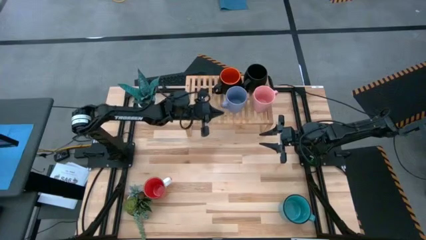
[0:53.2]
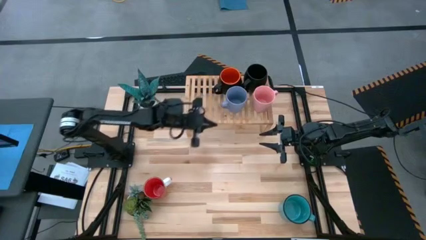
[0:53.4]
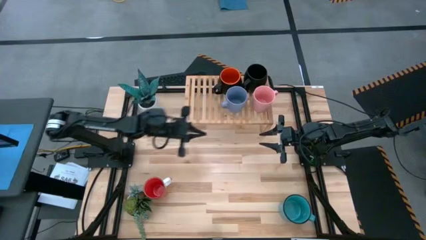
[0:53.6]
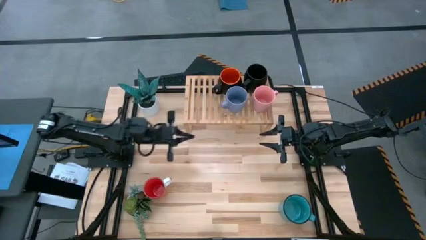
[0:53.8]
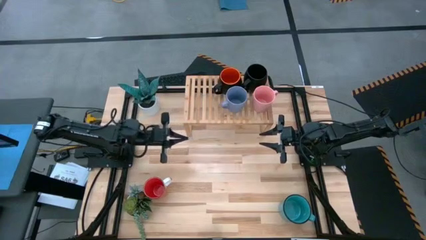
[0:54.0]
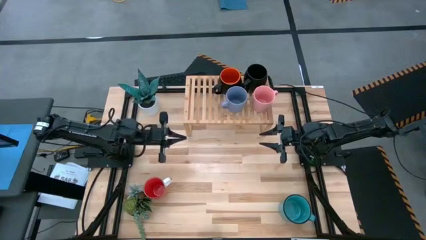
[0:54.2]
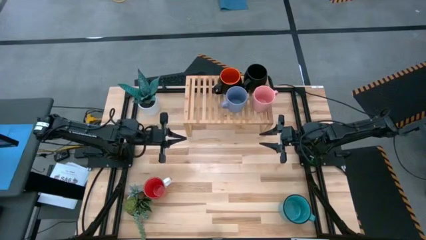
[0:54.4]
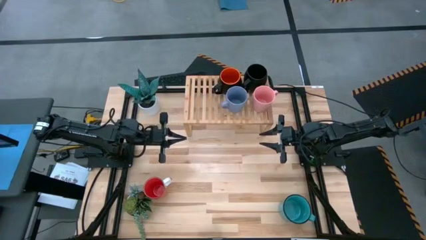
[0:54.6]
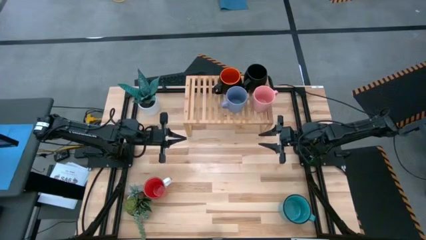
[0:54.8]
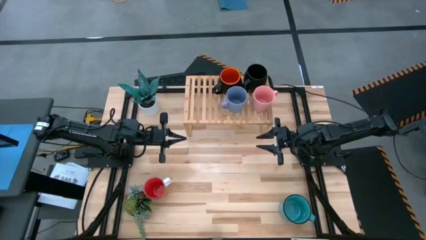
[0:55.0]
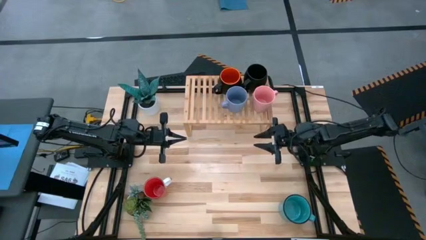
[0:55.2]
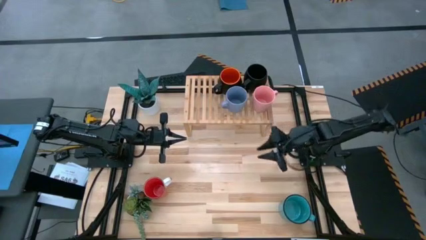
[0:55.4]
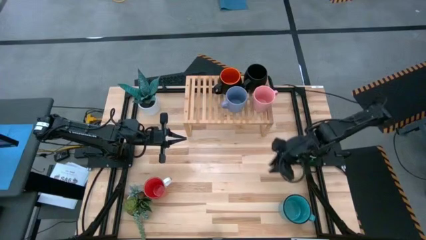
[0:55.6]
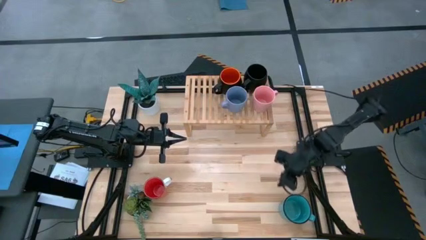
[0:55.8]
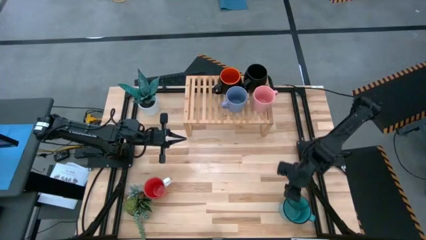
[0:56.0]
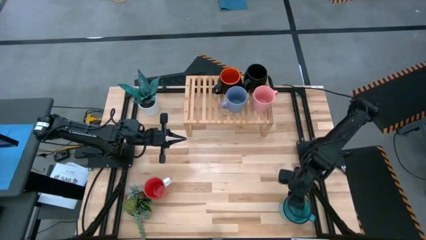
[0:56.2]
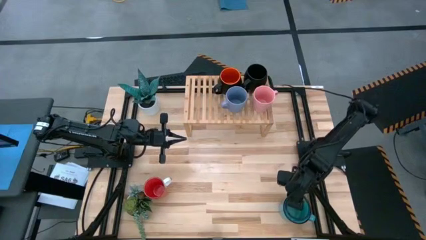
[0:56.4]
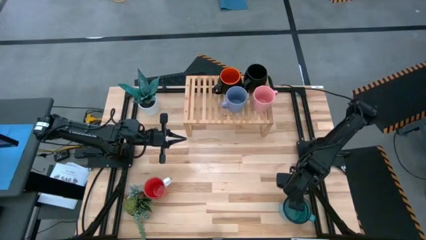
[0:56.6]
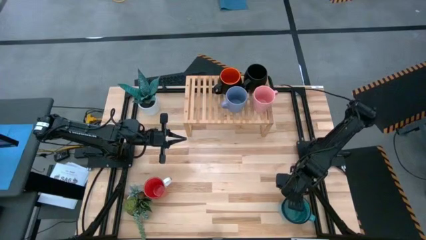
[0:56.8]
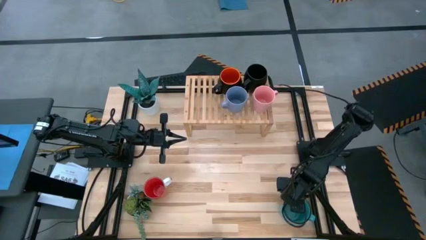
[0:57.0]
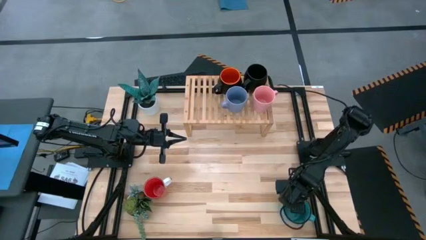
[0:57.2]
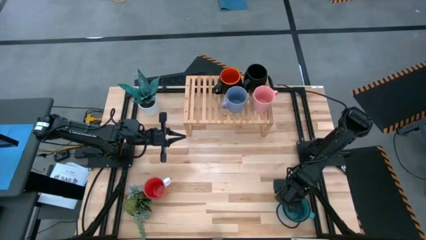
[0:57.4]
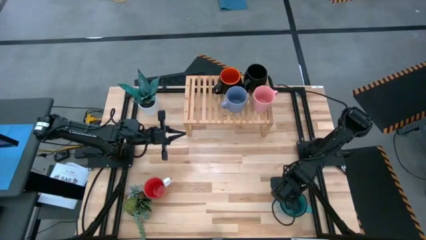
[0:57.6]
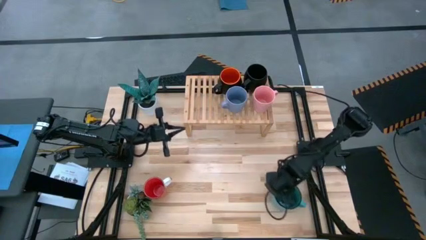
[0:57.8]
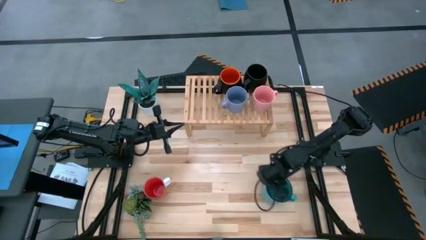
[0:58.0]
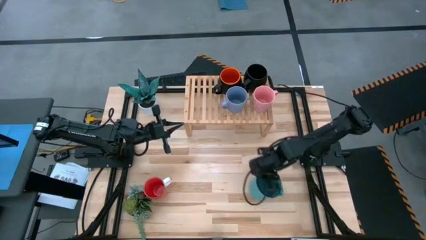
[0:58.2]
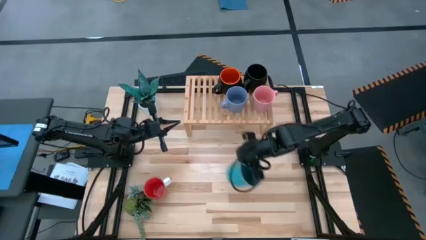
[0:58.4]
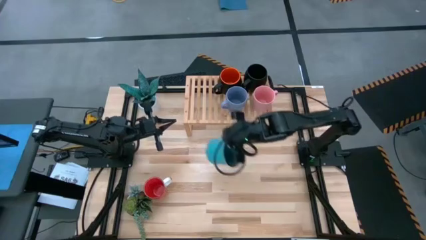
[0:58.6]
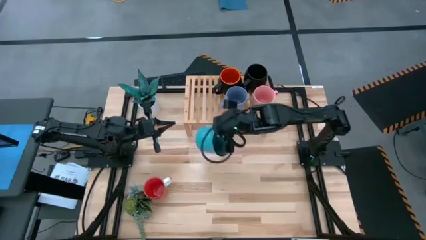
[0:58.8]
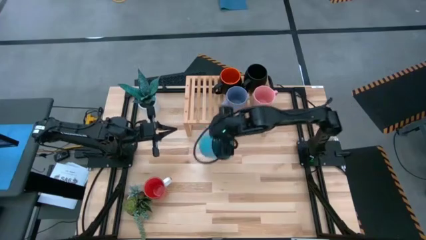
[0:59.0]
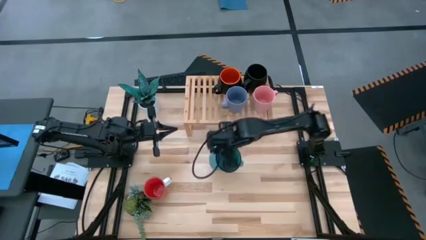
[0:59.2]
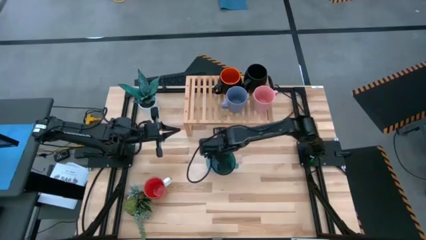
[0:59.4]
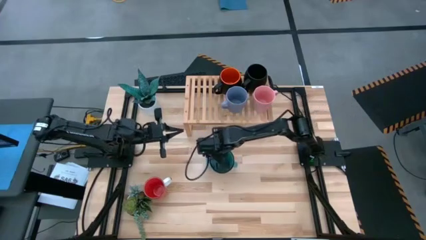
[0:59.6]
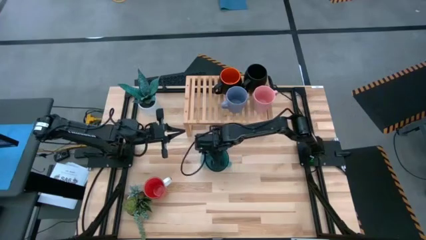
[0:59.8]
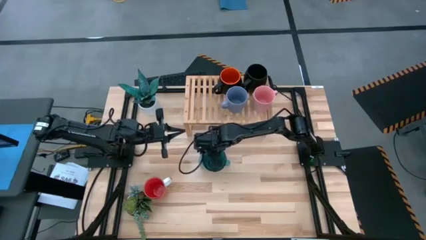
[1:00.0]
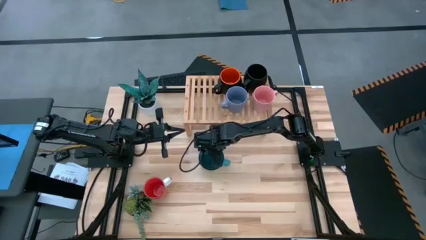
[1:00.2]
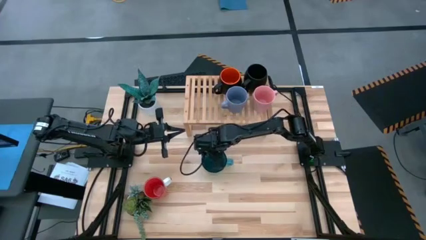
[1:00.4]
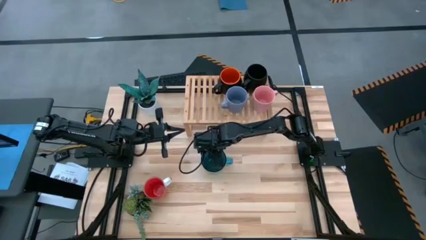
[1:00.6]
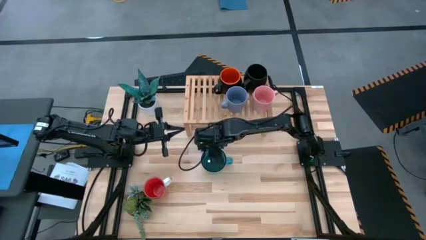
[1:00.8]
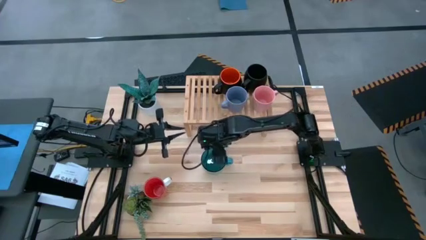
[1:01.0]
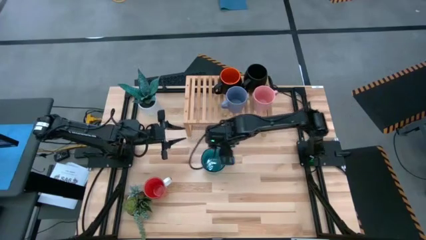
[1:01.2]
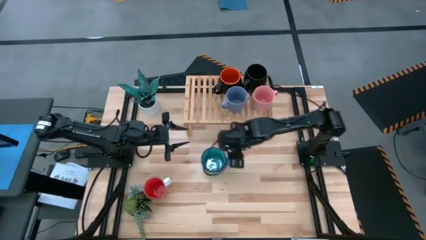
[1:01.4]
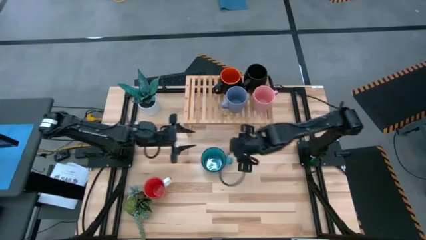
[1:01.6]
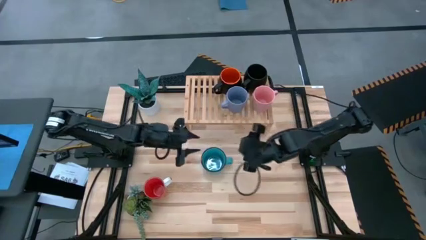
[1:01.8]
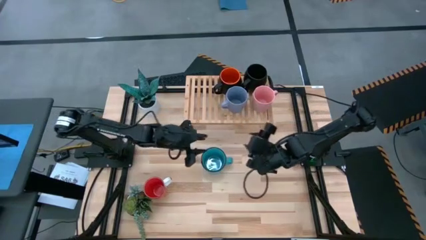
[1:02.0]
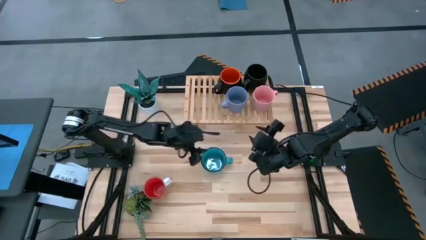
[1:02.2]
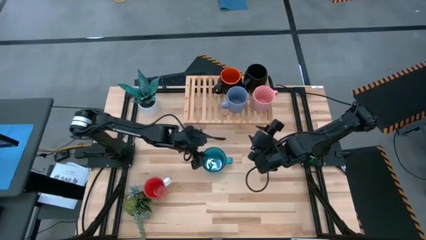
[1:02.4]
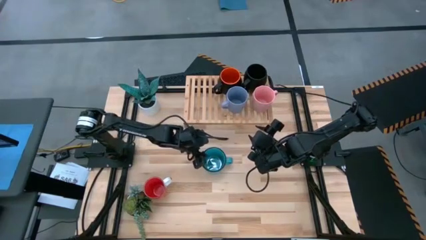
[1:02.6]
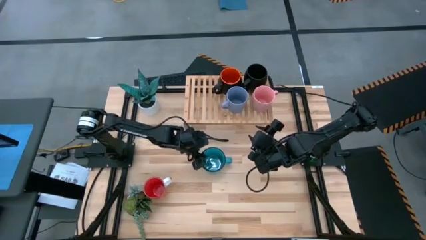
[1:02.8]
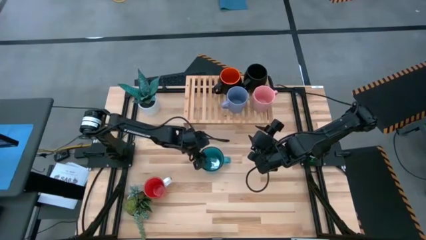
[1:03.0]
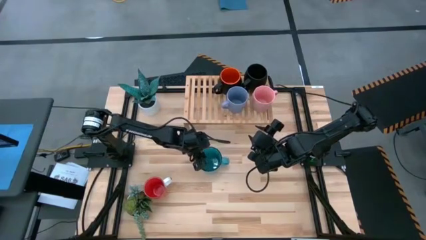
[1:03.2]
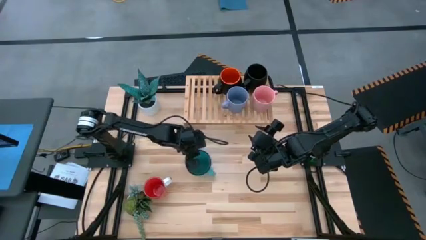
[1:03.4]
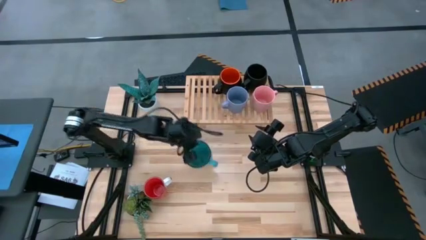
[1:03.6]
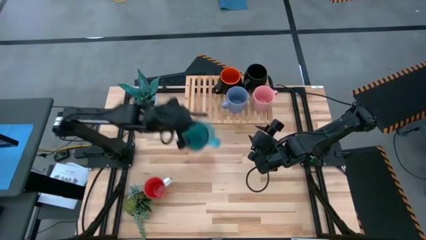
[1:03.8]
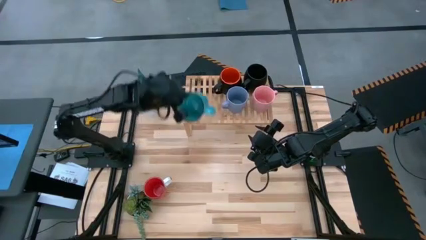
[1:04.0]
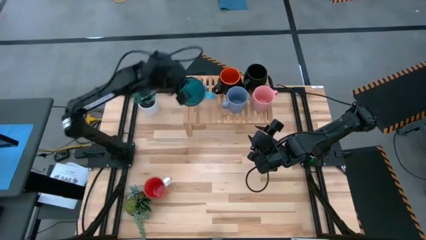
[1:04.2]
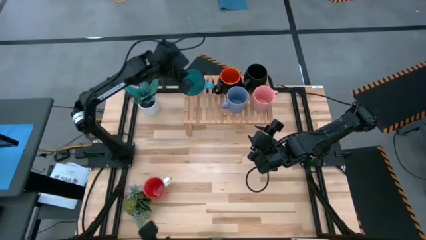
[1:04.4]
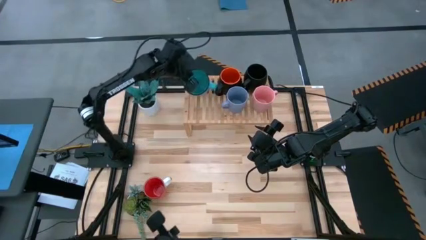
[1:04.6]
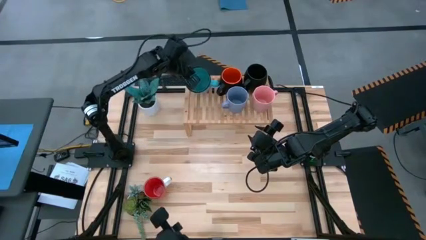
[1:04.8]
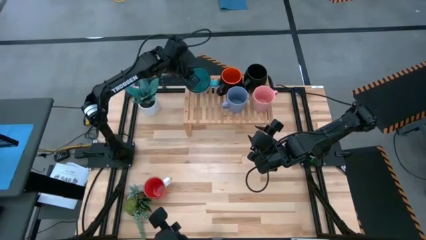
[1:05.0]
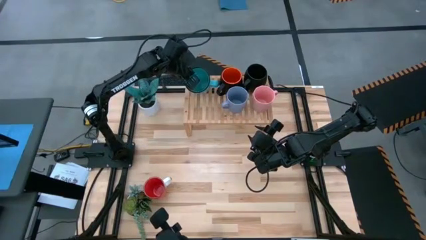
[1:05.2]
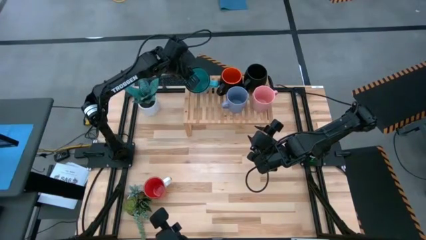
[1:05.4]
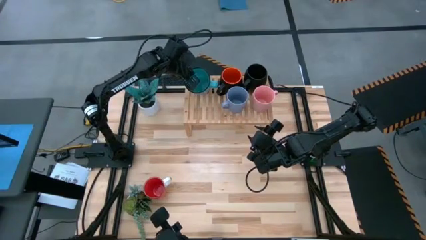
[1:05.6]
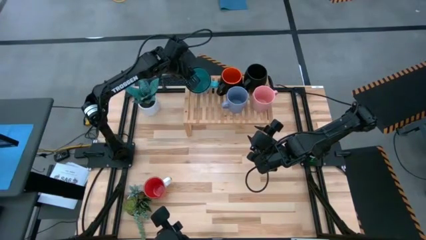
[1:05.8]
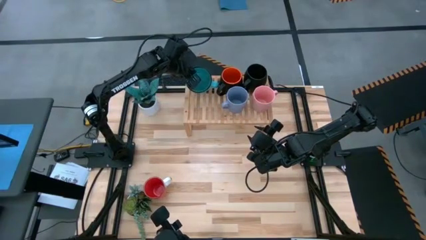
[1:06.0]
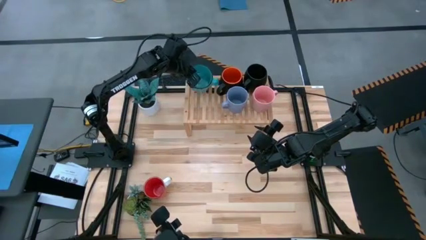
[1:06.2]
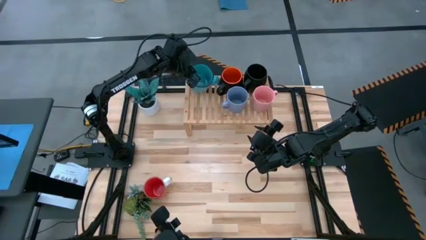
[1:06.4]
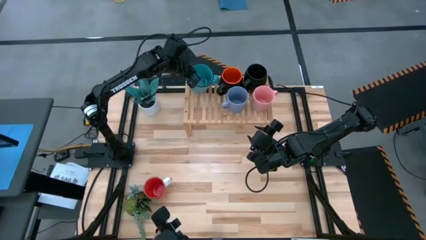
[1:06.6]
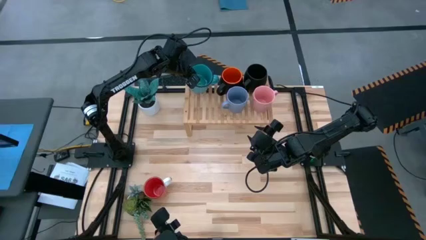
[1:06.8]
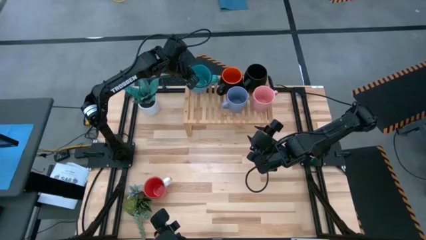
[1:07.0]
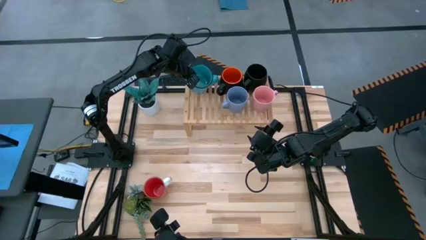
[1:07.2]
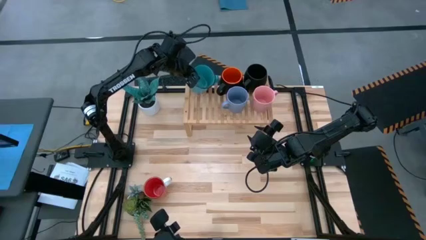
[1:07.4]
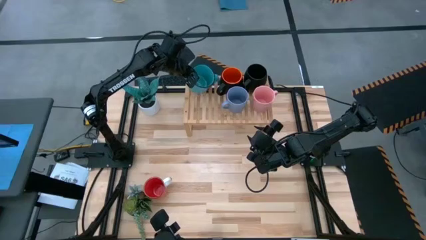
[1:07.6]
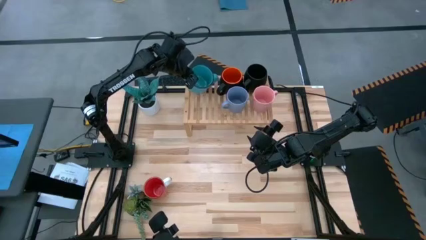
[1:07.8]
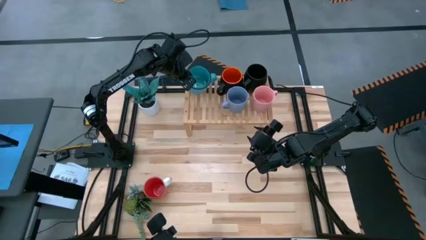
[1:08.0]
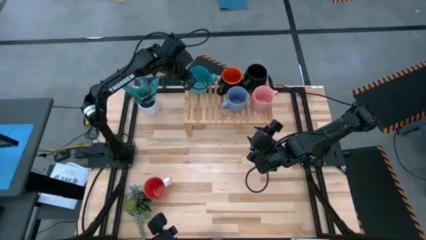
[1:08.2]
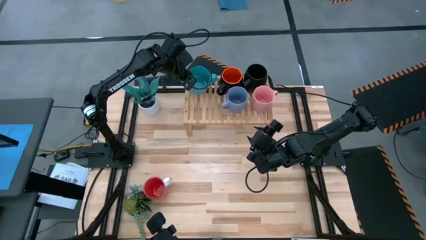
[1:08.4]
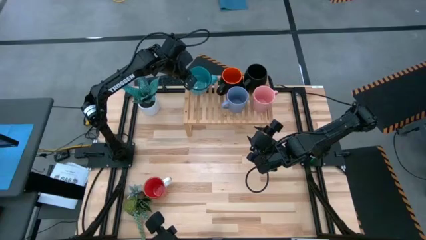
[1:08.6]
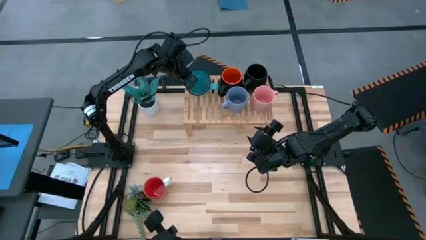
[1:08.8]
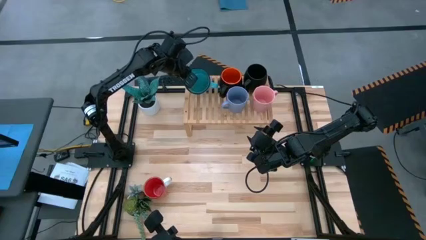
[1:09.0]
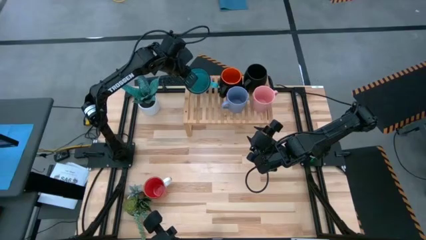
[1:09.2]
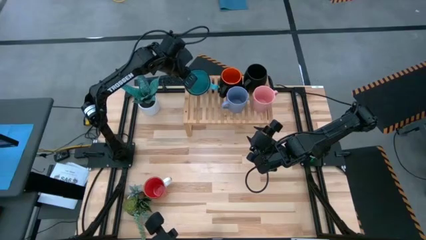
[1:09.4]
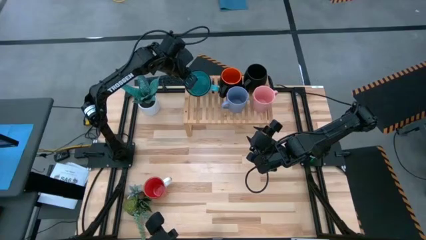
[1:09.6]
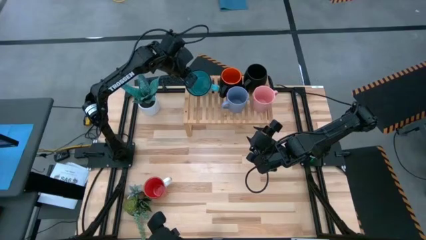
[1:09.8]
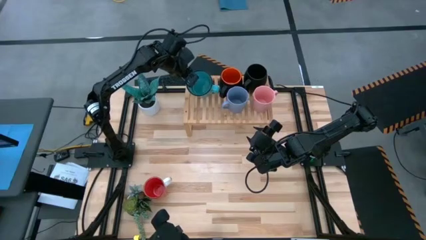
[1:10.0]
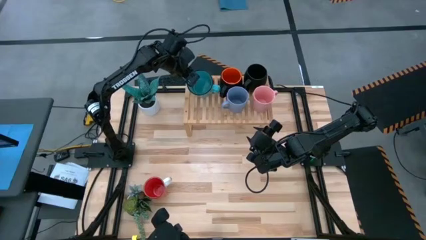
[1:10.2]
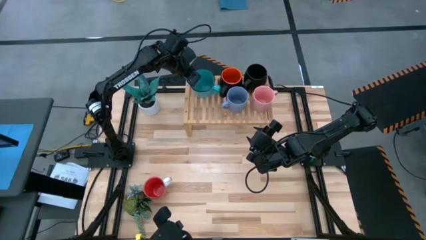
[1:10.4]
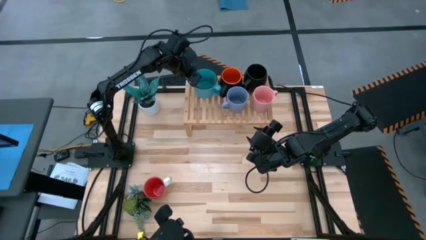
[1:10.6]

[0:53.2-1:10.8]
Task: Place coffee mugs
Put the green mug on the shelf
